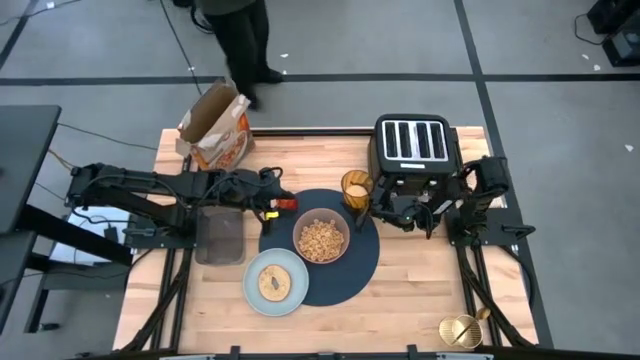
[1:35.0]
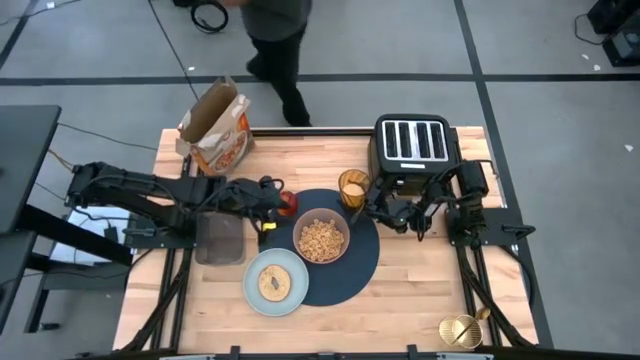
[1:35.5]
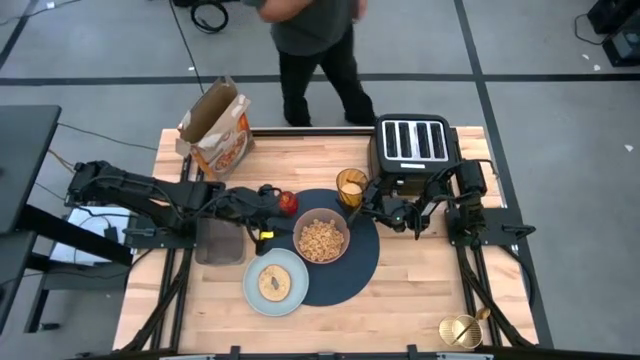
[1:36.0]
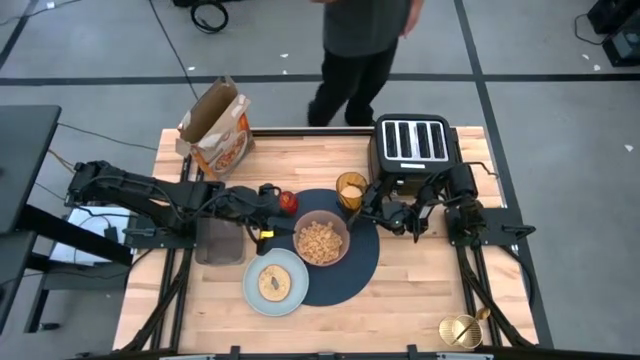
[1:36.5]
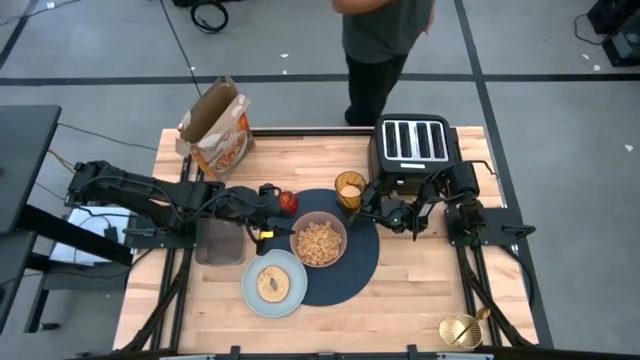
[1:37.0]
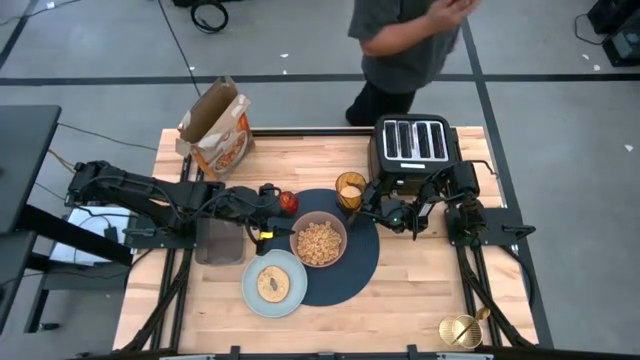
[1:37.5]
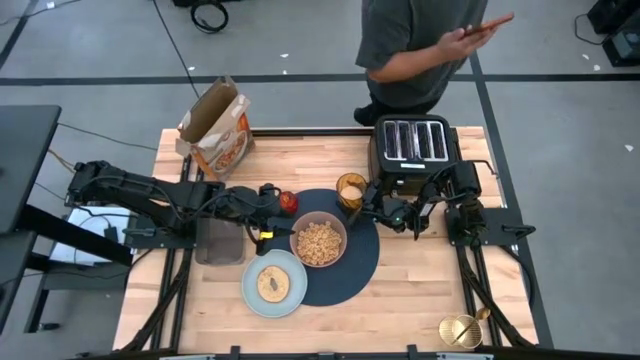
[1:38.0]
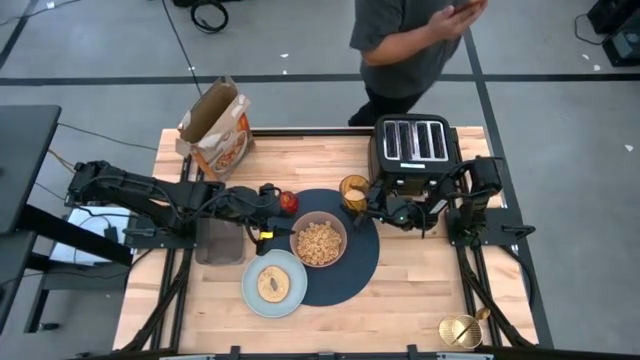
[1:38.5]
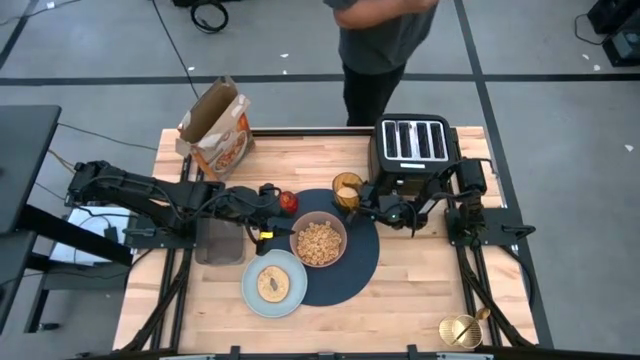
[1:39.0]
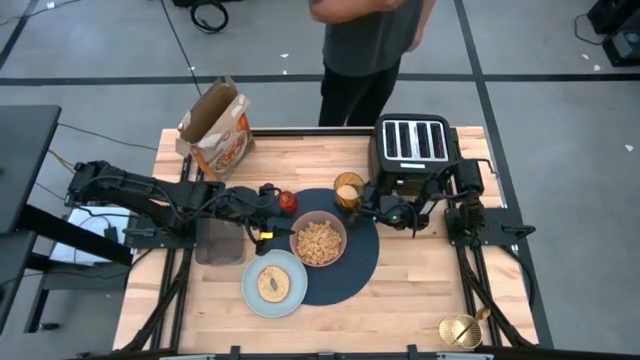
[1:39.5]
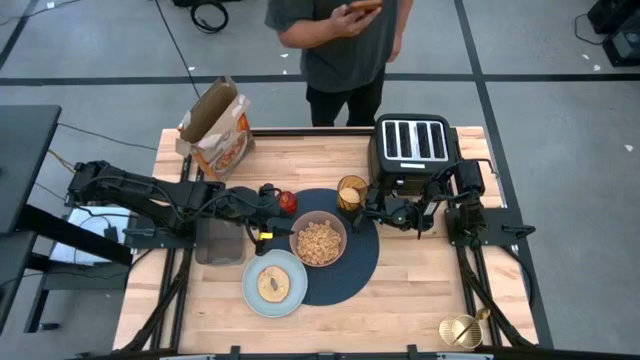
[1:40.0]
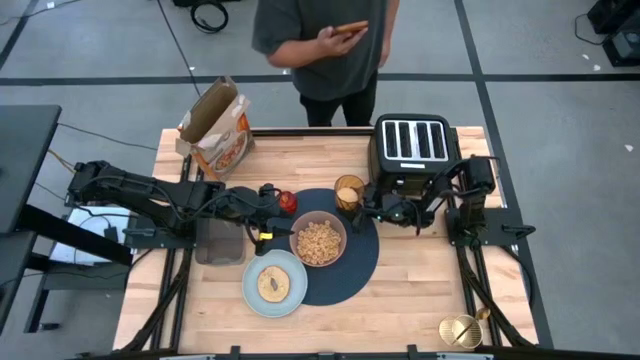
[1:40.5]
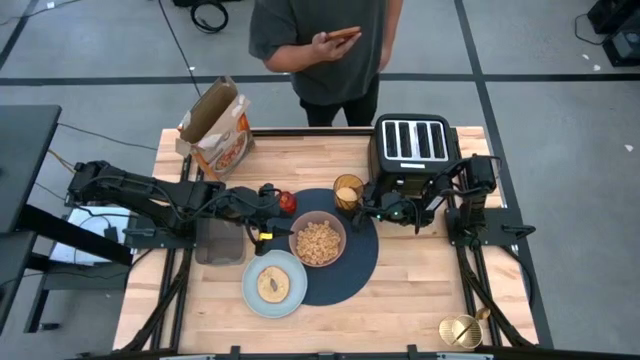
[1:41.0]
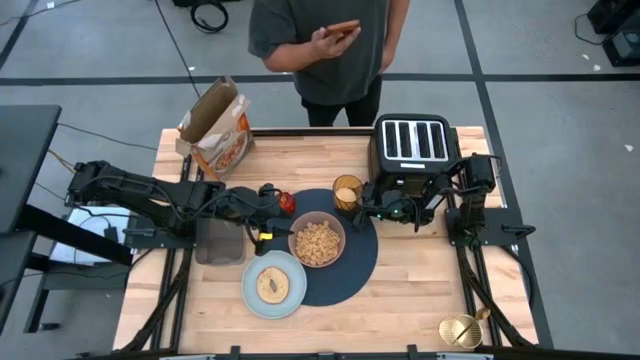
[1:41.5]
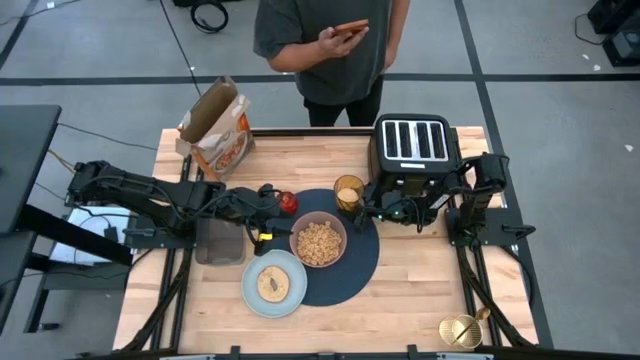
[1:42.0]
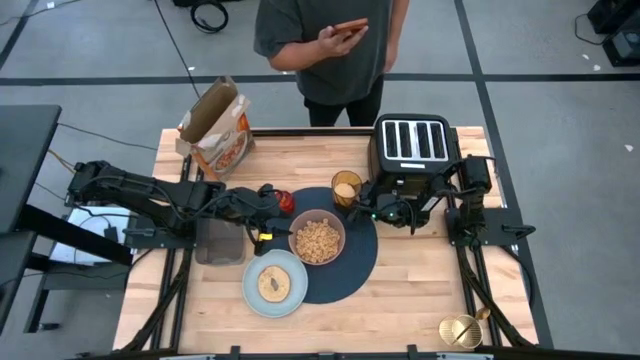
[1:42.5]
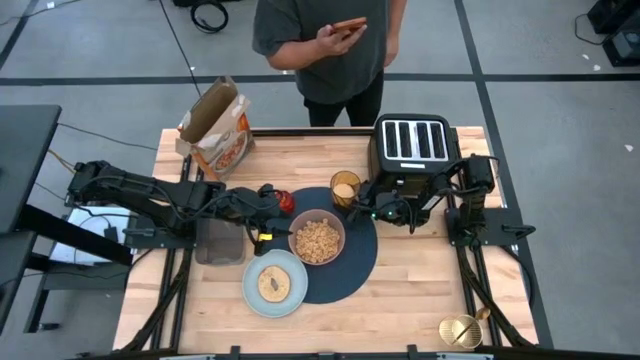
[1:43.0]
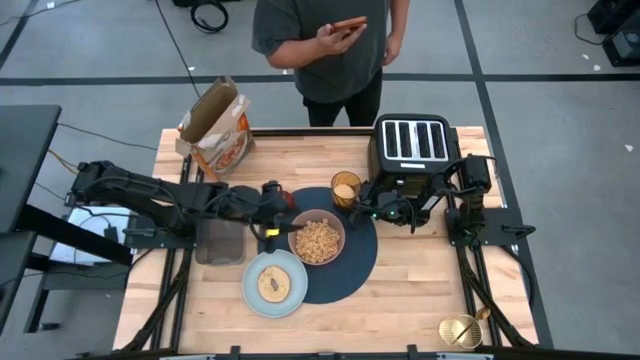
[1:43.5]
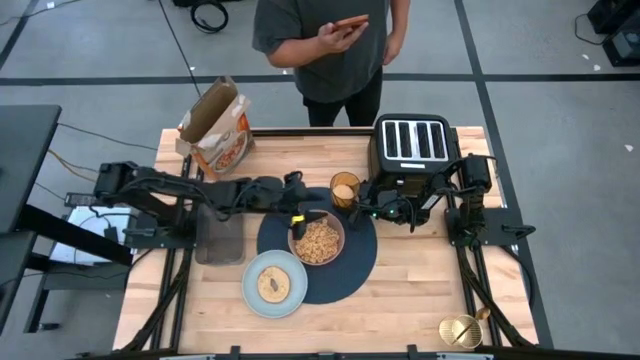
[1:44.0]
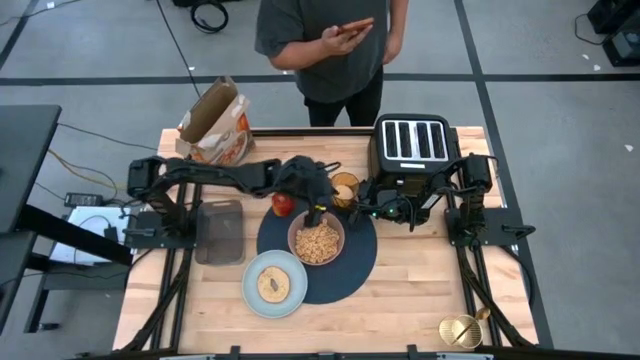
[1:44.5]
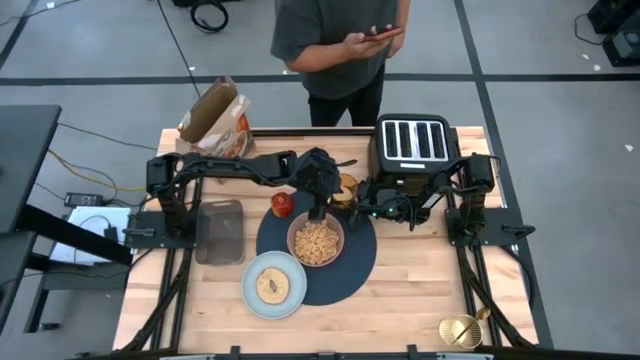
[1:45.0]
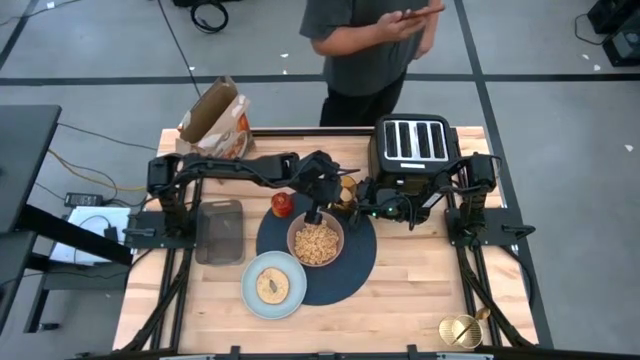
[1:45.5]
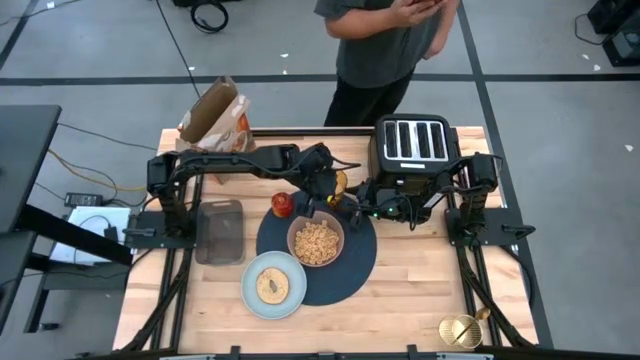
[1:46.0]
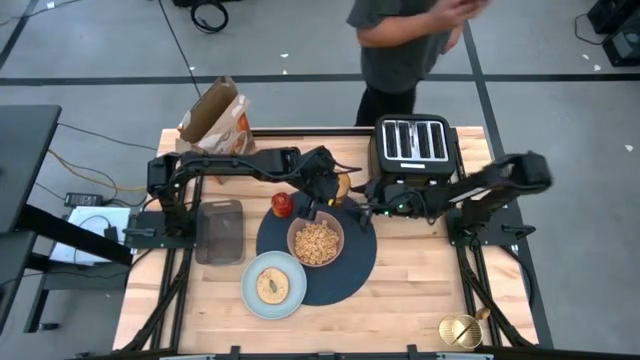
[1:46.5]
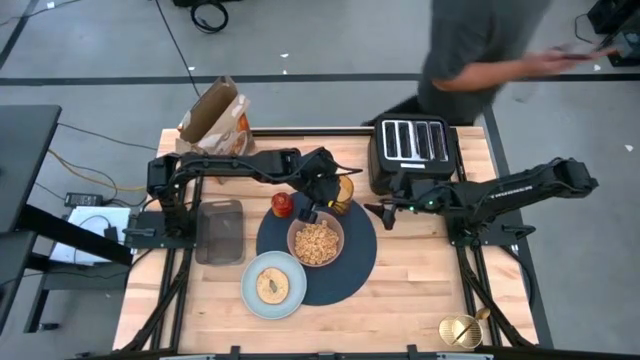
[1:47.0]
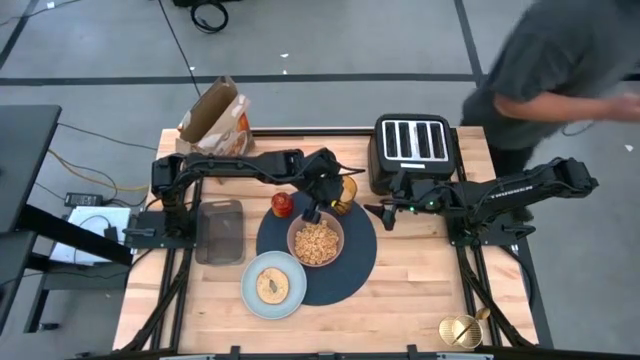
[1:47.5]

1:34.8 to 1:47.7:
Task: Arrange a breakfast setting
Put the yellow cup on the top right of the orange bowl on the blue placemat

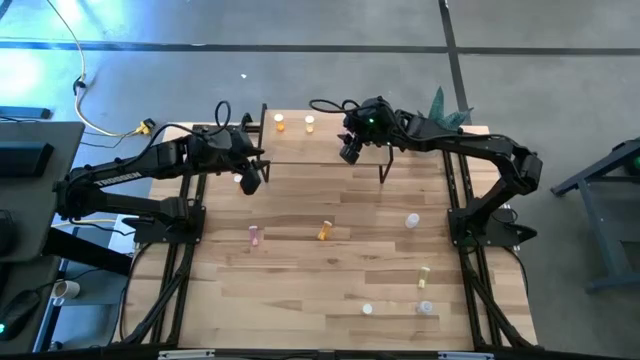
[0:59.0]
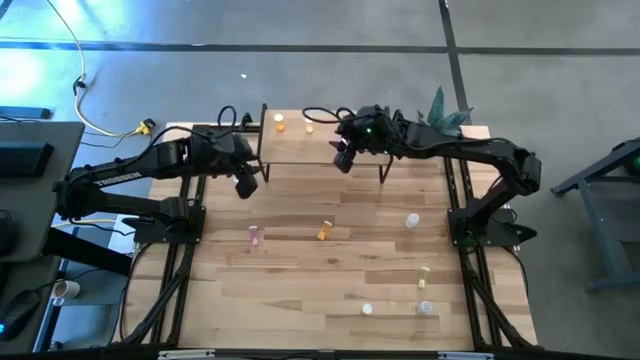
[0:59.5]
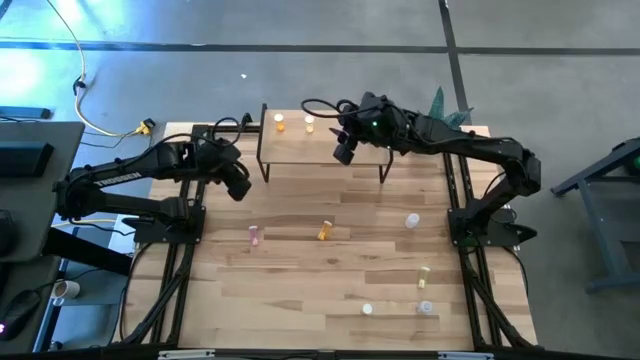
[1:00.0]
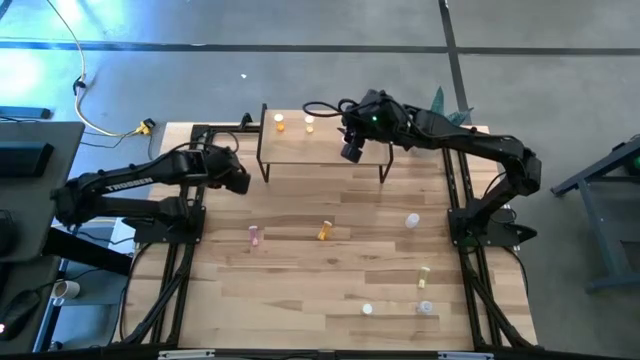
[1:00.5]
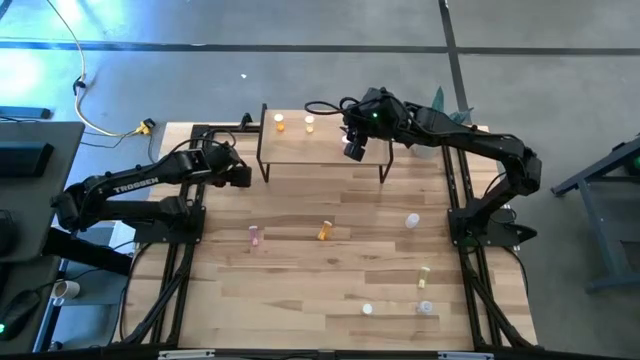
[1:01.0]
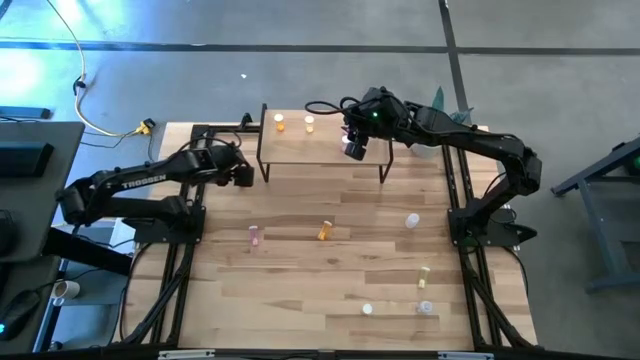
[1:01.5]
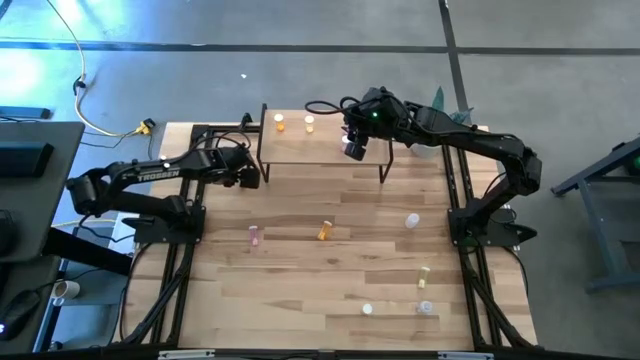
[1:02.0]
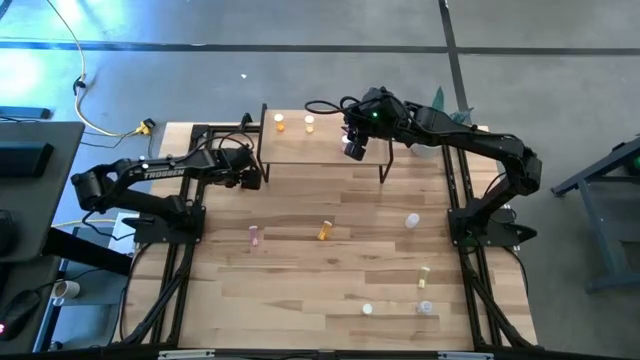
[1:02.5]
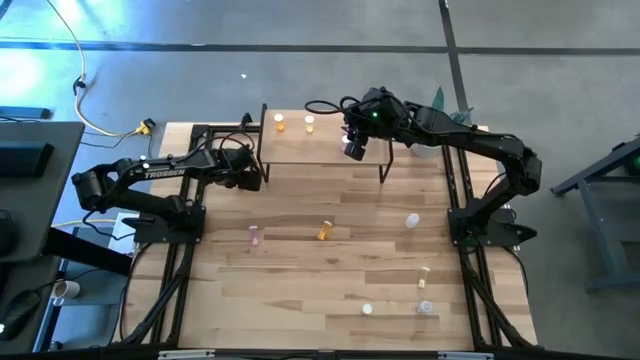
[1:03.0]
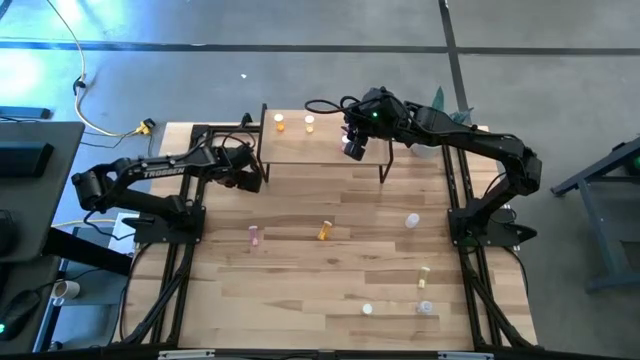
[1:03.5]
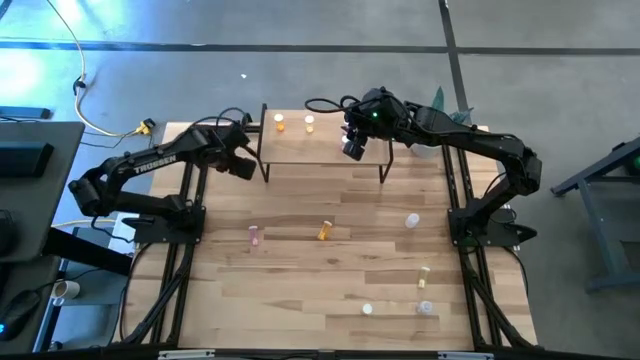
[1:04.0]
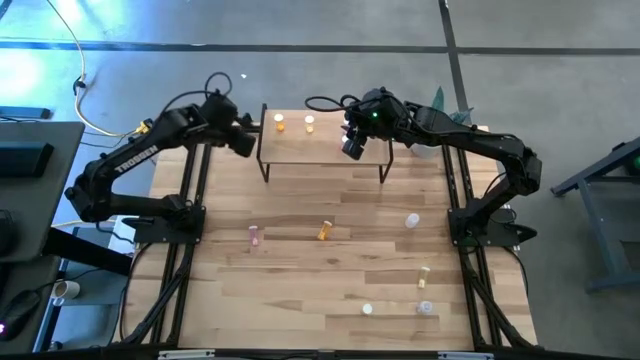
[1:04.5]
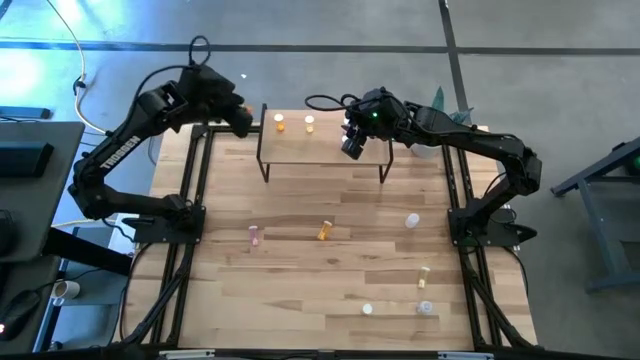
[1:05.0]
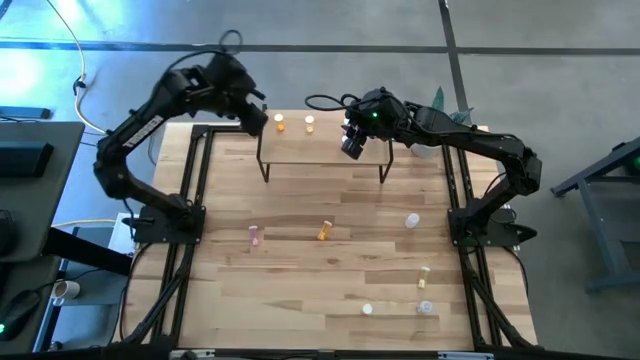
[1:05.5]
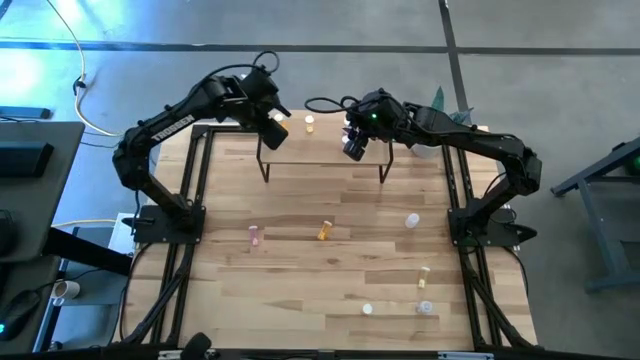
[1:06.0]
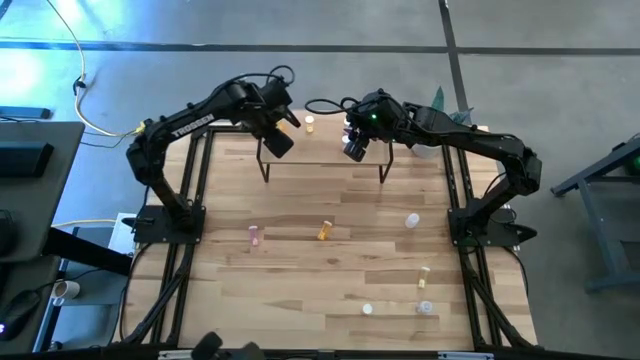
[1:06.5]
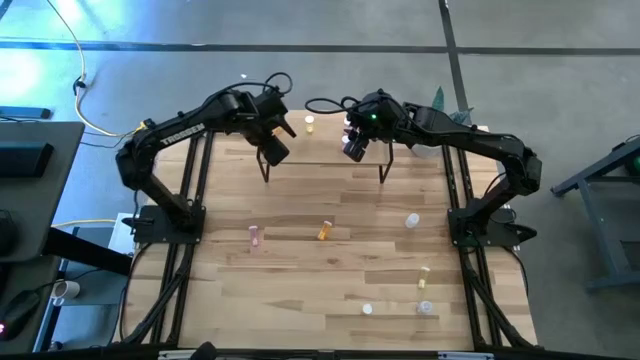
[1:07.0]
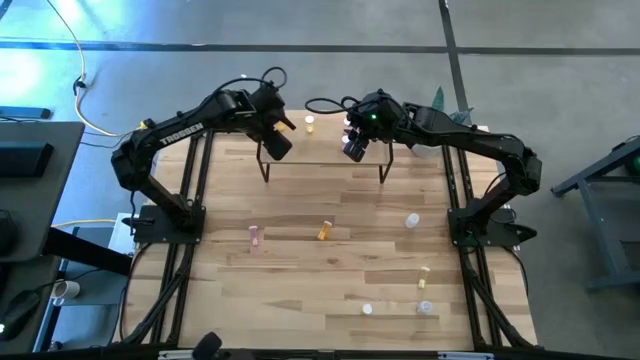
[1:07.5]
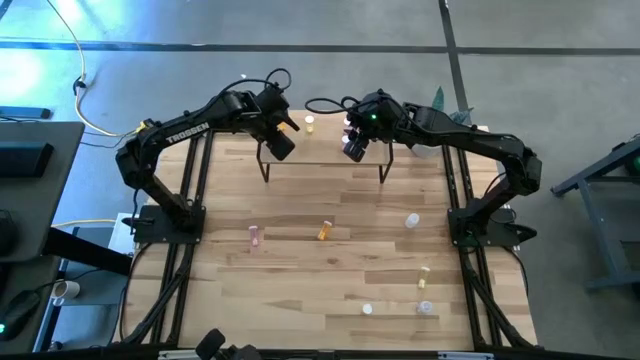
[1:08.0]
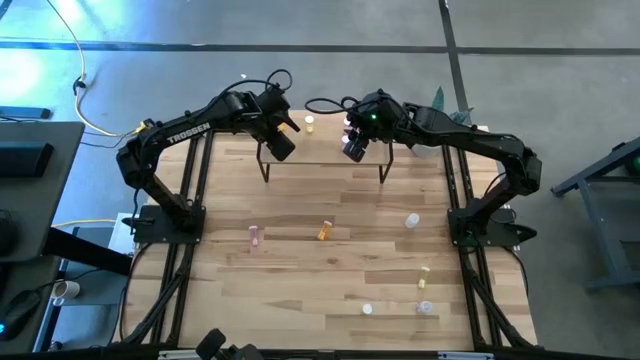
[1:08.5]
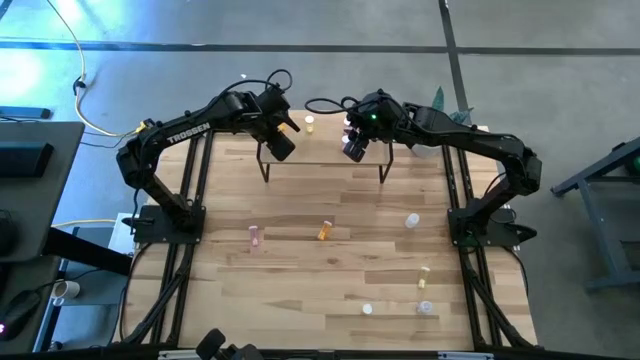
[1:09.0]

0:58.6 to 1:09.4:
Task: Pick and place medicine bottles onto shelf by color
Put the top orange pill bottle on the shelf aligned with other orange pill bottle
